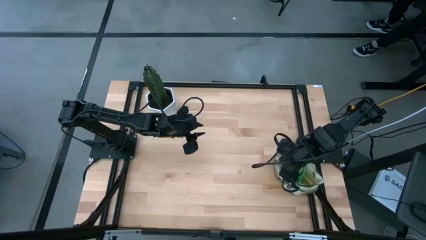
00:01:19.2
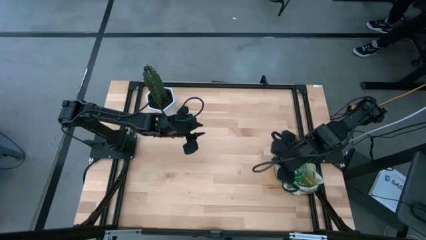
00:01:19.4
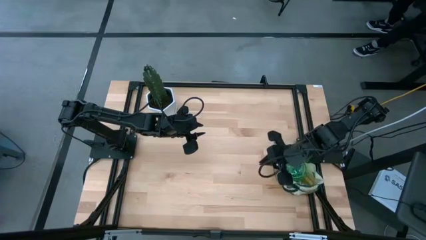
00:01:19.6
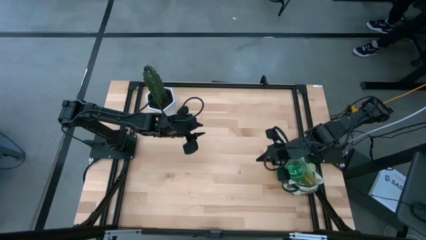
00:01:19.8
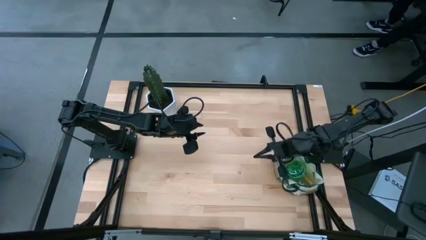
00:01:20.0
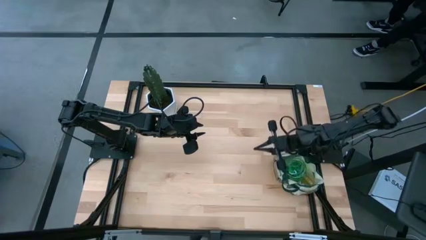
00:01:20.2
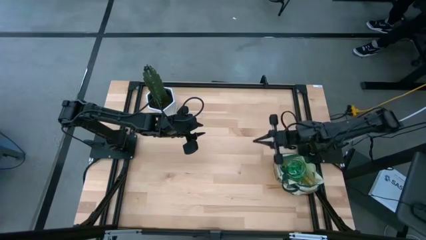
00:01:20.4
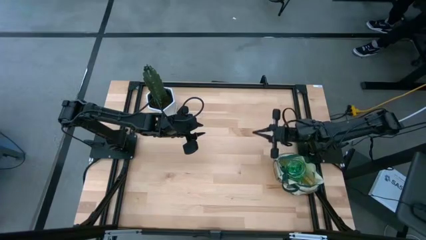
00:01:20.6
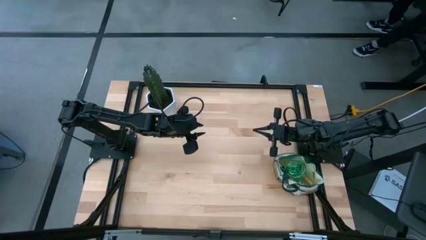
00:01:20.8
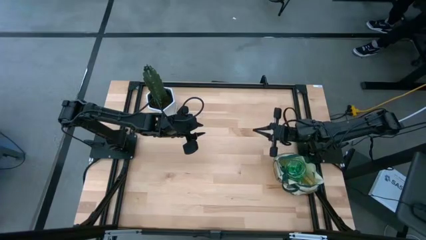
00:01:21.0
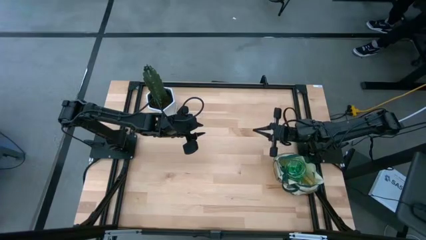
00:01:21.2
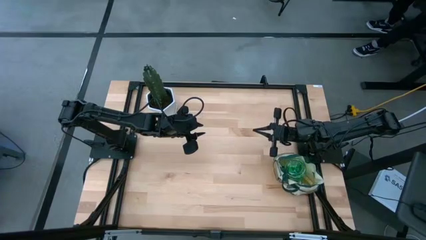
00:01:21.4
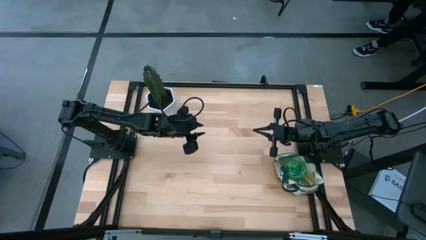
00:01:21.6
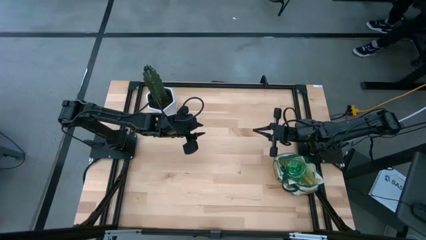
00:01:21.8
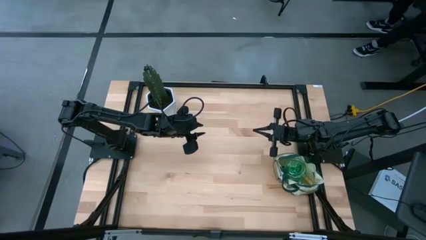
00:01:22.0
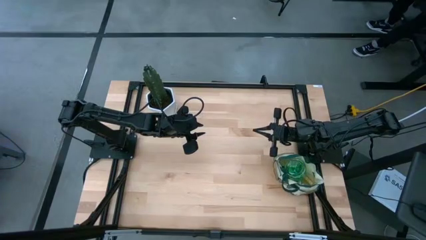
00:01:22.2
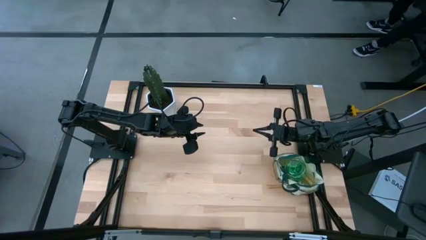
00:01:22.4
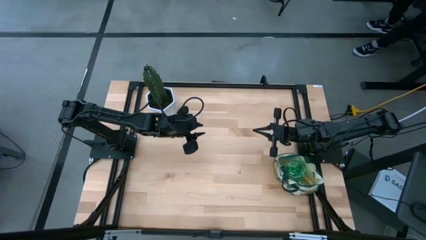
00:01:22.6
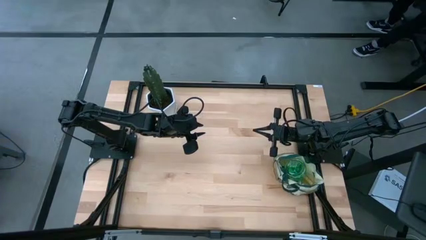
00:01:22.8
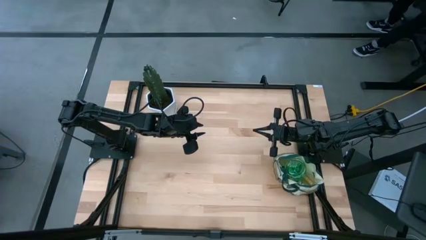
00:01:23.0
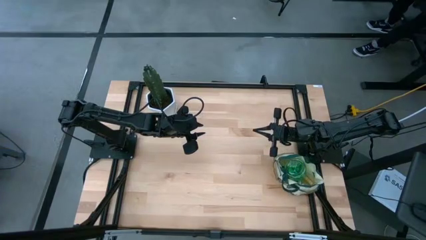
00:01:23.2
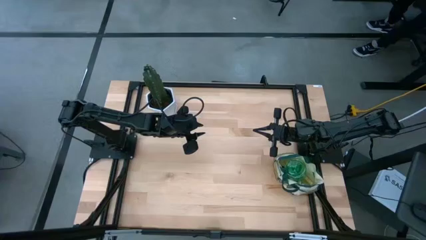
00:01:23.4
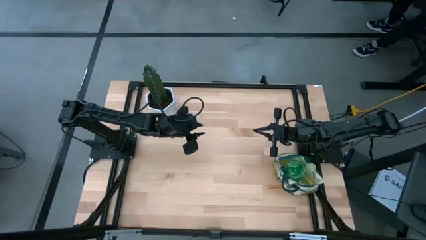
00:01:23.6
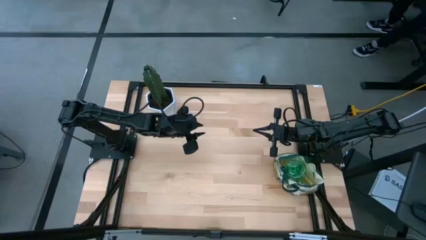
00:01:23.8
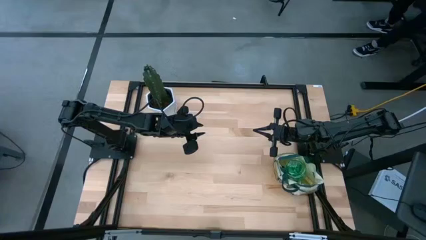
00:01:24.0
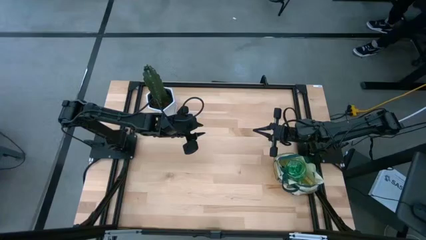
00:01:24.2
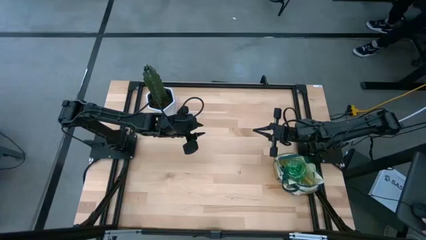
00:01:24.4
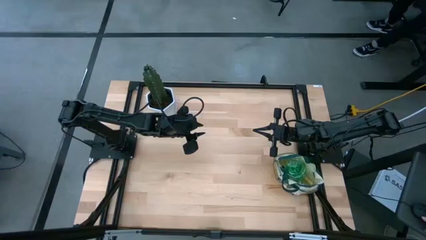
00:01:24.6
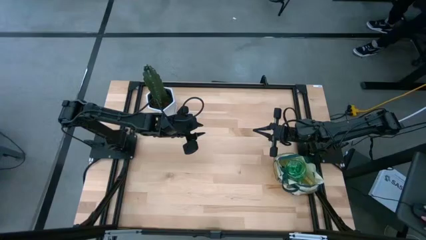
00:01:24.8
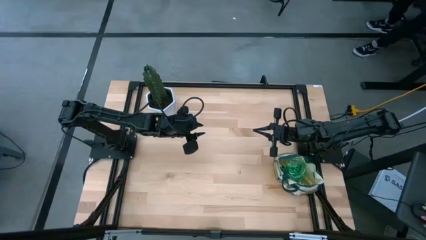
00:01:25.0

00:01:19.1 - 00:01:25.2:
Task: Pick & Place Garden tools in Gardening bag
Return to Home Position

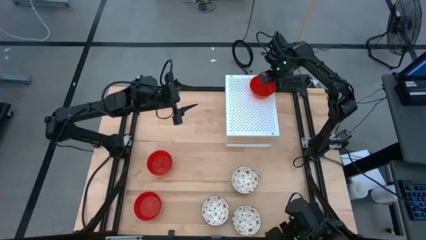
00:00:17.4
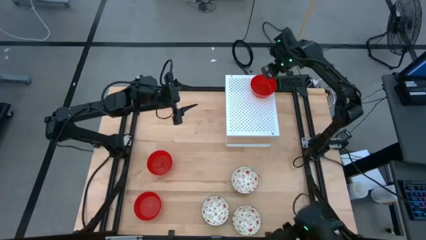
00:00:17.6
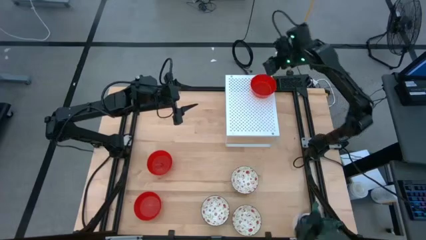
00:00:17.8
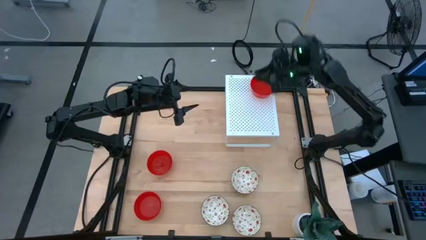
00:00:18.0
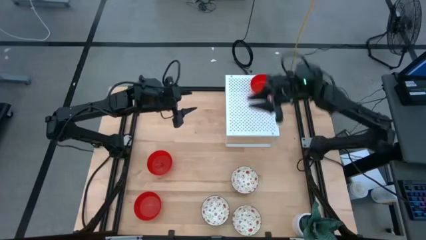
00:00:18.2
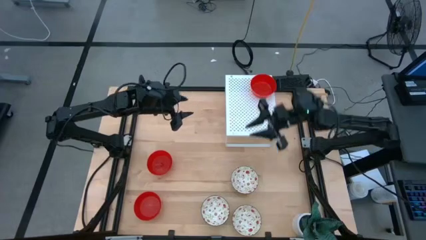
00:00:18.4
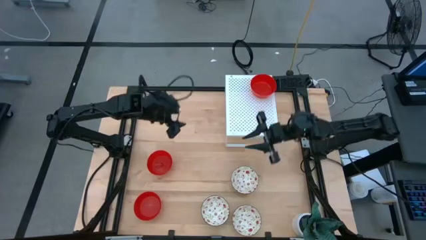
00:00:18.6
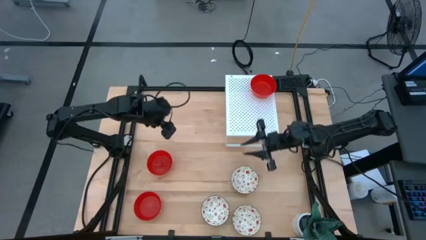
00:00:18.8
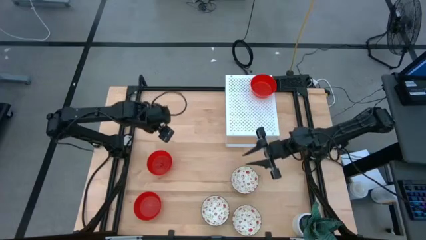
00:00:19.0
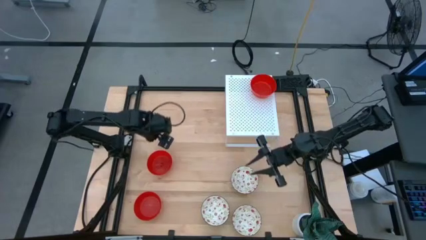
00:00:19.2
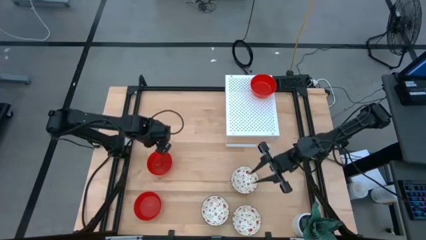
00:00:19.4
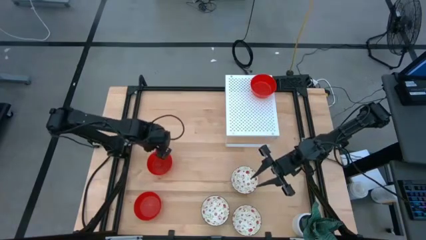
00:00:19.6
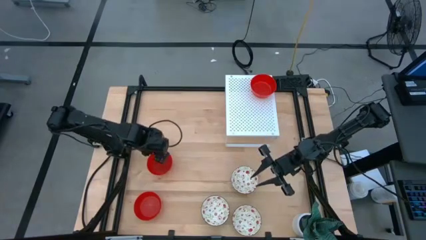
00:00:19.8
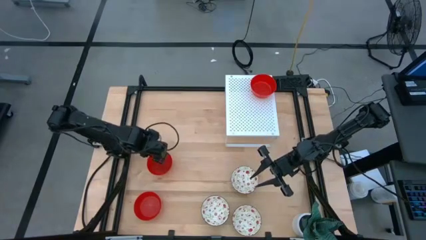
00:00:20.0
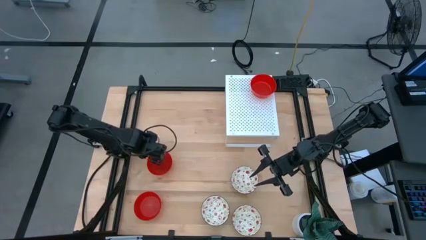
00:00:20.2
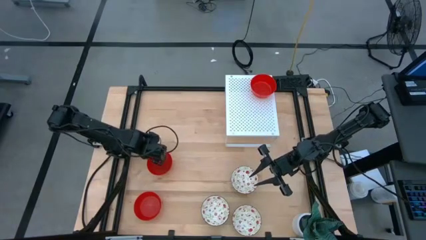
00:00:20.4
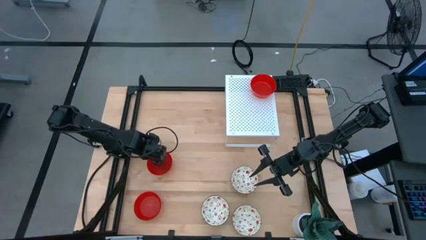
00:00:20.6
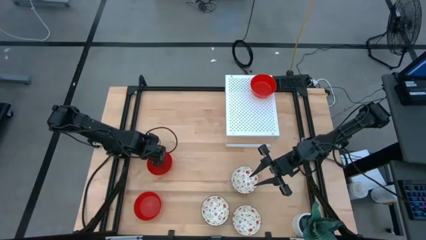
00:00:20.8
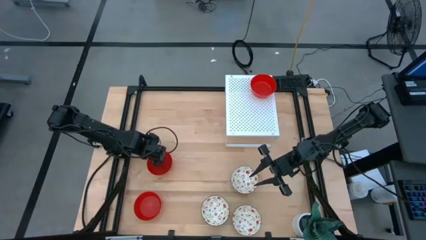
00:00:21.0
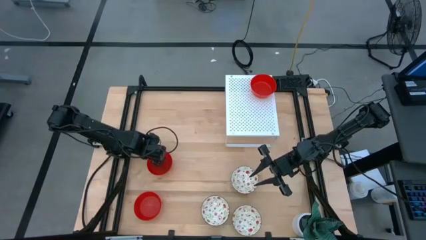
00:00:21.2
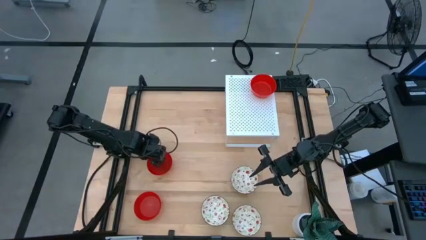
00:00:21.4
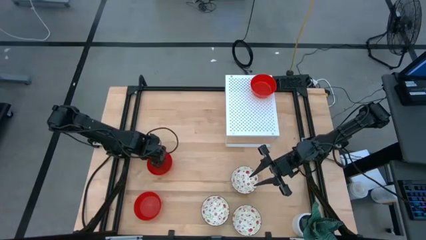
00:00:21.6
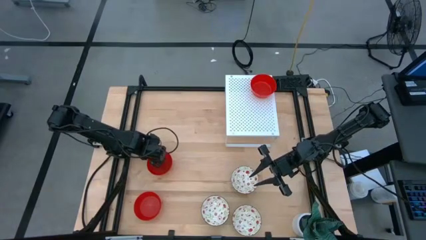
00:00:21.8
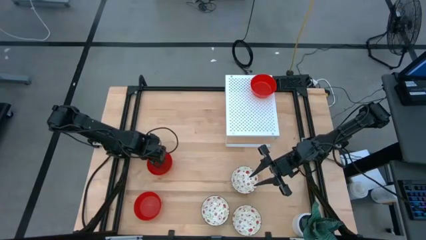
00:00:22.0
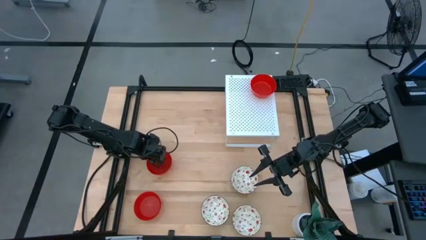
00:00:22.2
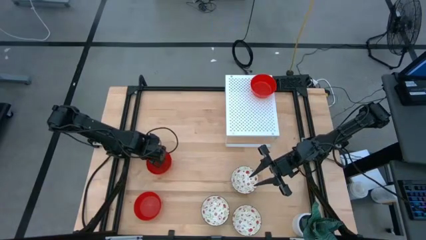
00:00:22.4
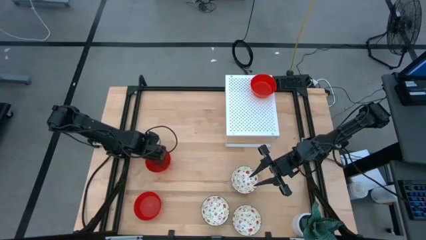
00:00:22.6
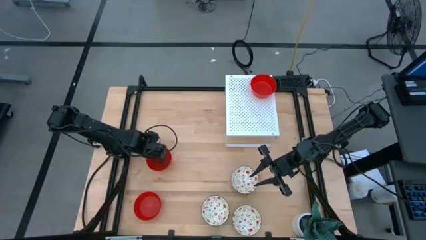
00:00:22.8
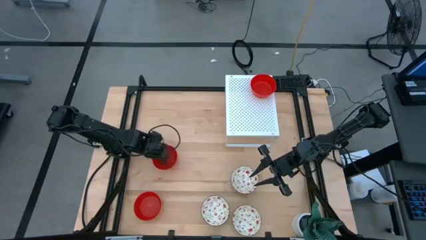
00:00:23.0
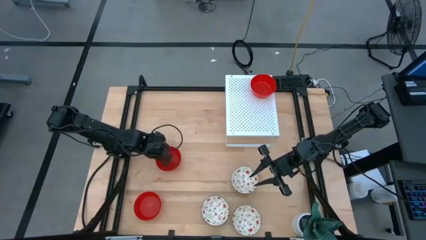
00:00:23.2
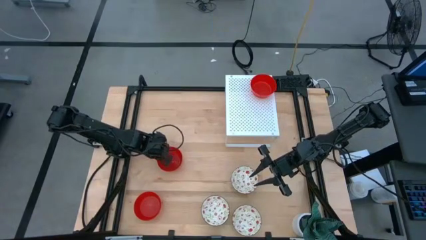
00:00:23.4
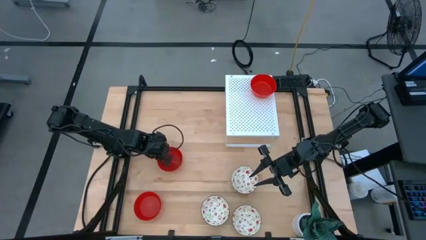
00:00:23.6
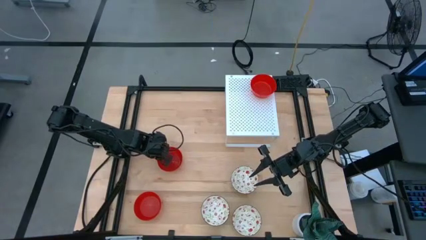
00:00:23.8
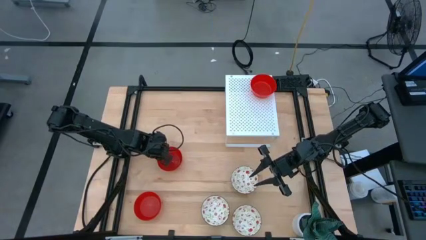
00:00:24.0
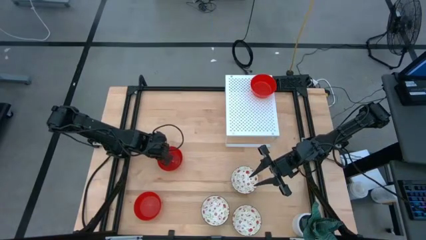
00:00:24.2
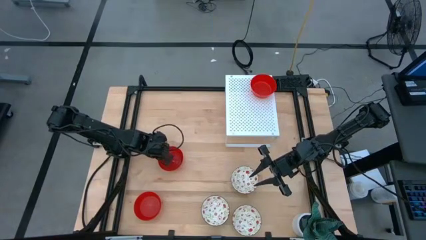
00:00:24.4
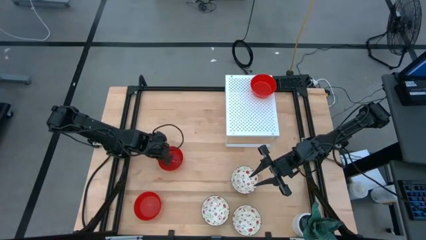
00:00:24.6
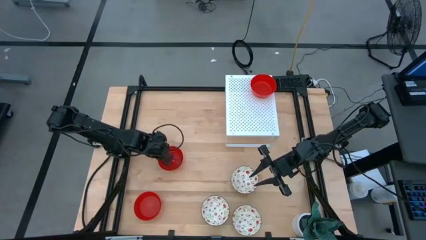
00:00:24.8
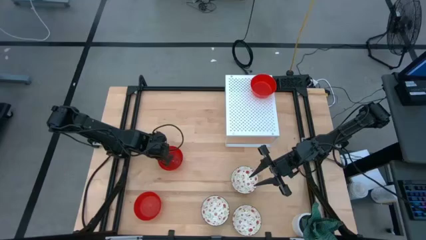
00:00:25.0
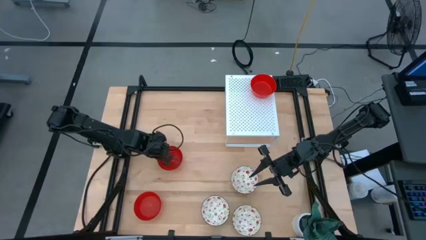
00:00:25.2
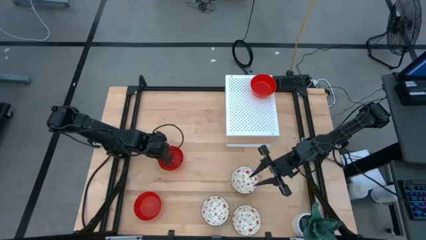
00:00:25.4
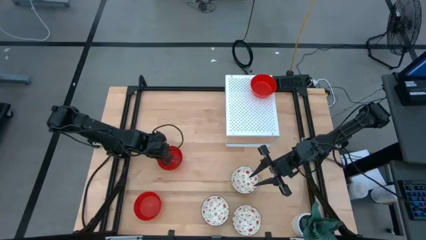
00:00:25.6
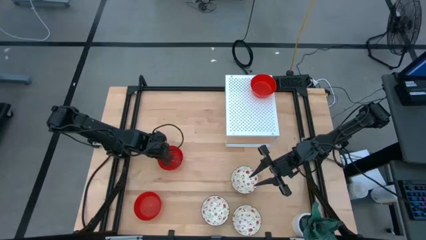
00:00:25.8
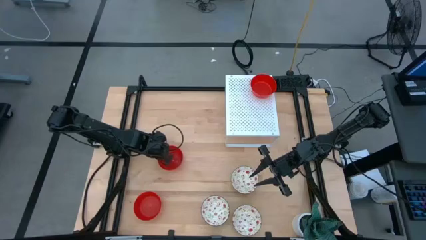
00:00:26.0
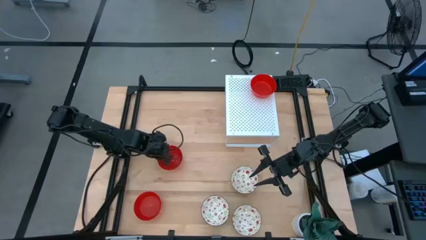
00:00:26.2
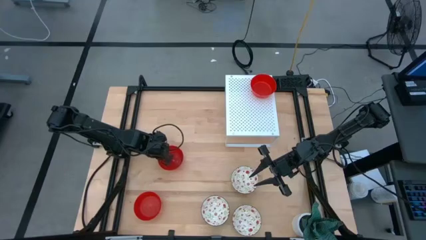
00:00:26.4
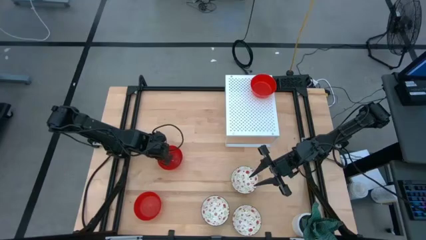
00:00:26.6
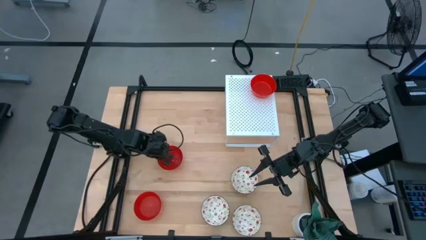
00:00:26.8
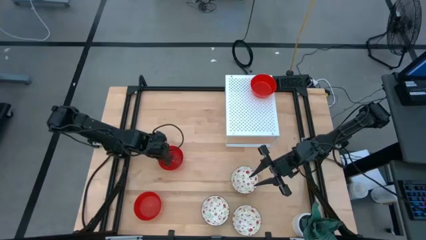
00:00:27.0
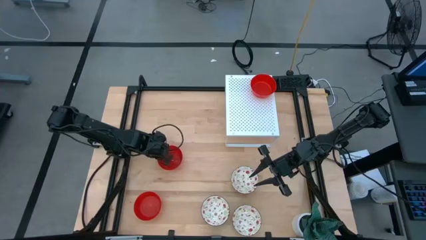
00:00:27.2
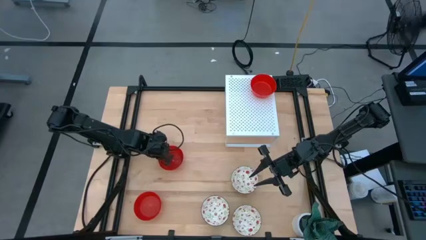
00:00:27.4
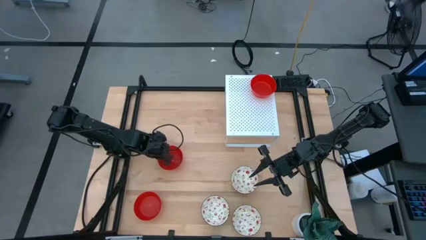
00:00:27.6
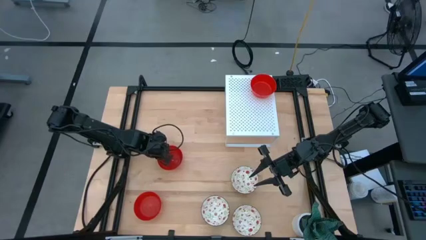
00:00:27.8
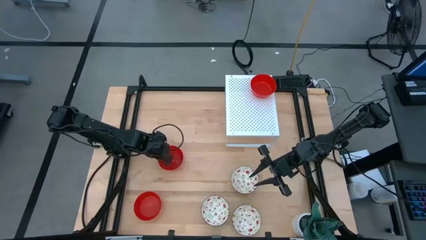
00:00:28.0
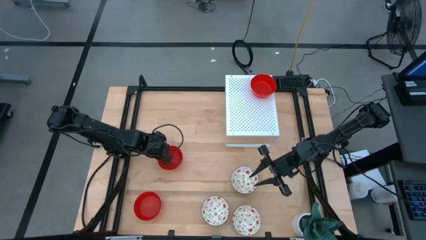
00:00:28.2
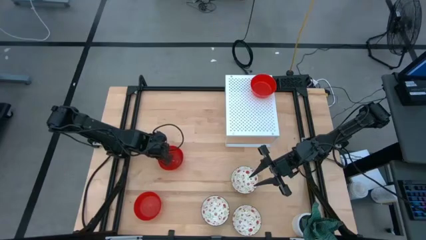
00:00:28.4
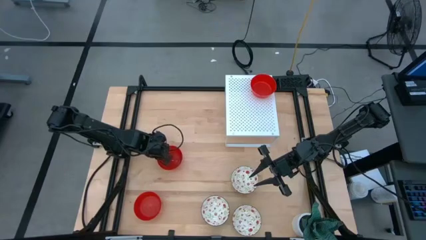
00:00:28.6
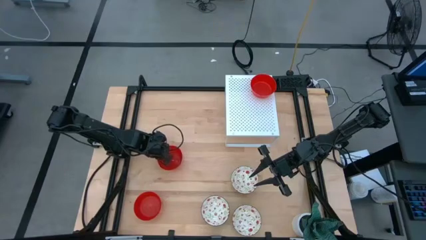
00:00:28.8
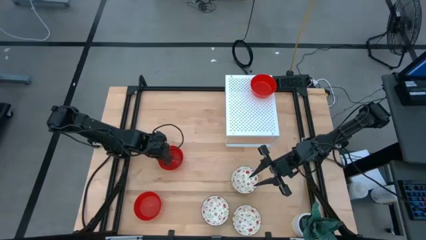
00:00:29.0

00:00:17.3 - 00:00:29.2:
Task: Pick & Place Mini bowls
Stack the top red bowl on the red bowl on the shelf
